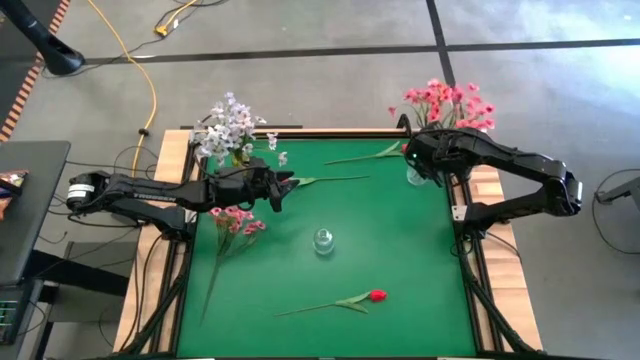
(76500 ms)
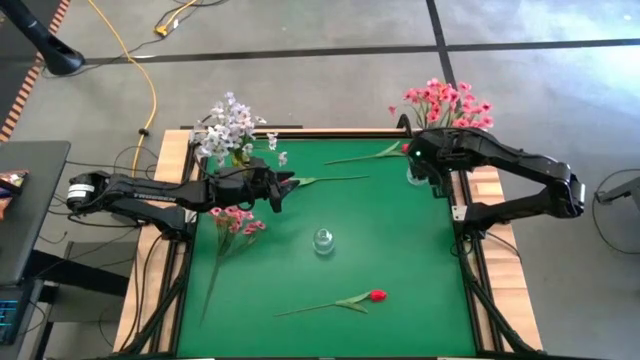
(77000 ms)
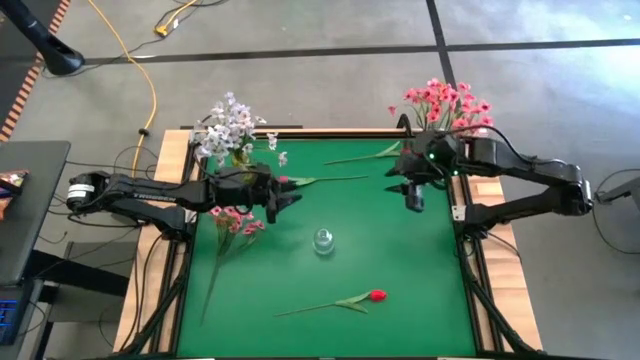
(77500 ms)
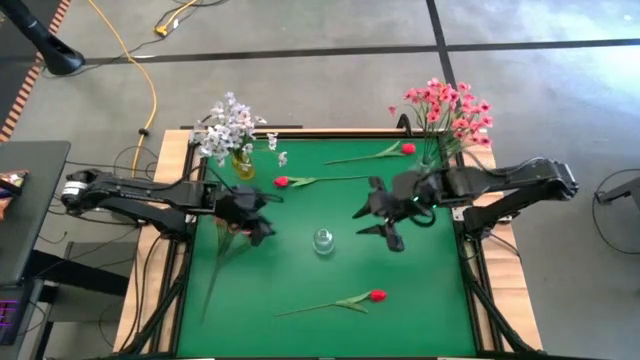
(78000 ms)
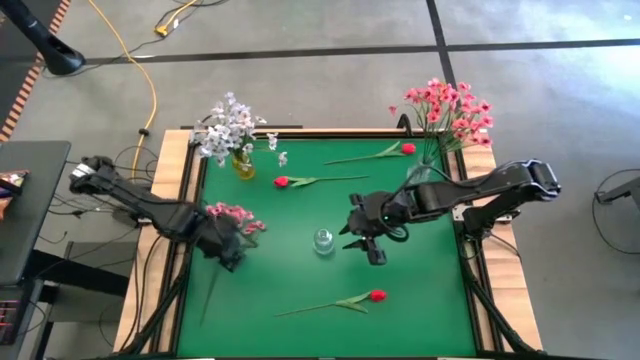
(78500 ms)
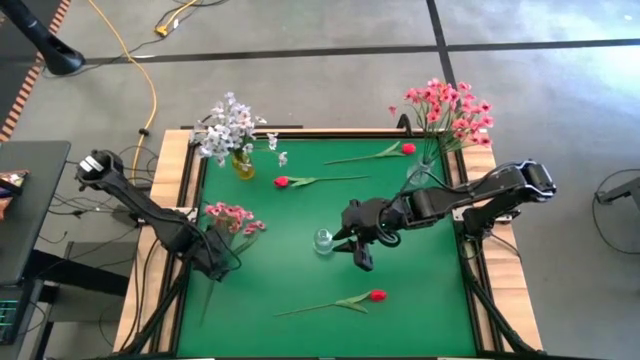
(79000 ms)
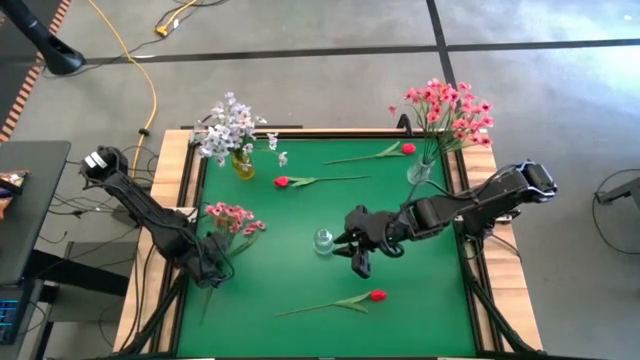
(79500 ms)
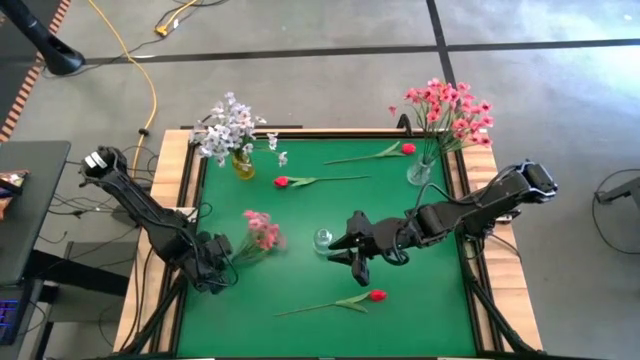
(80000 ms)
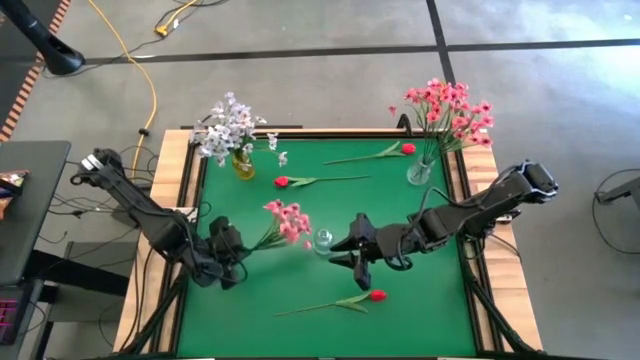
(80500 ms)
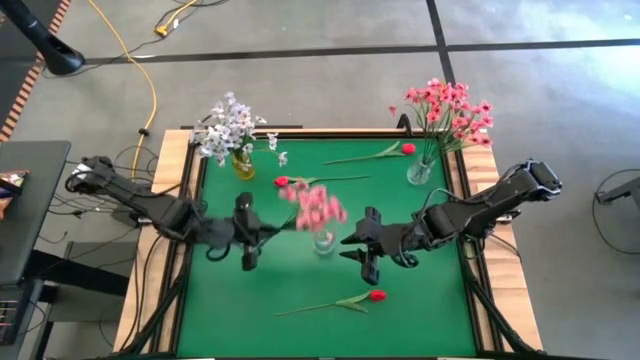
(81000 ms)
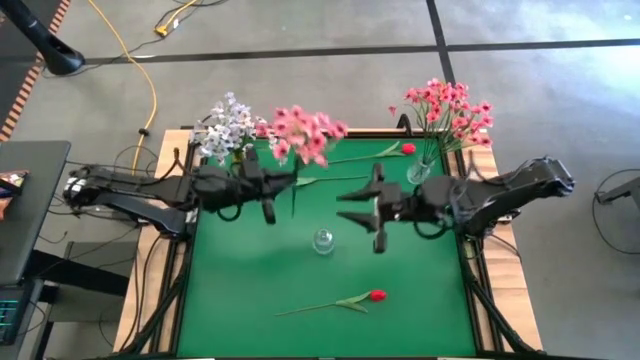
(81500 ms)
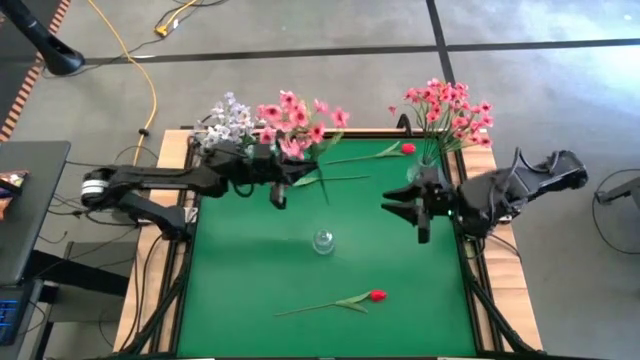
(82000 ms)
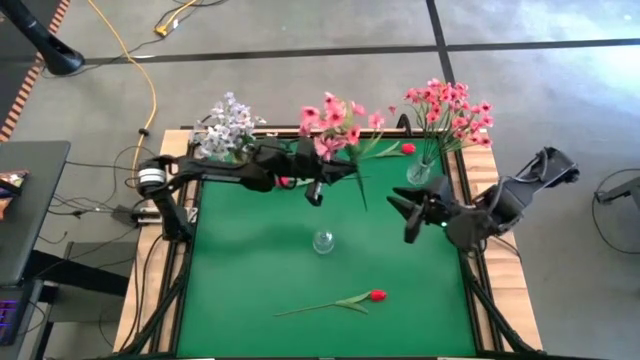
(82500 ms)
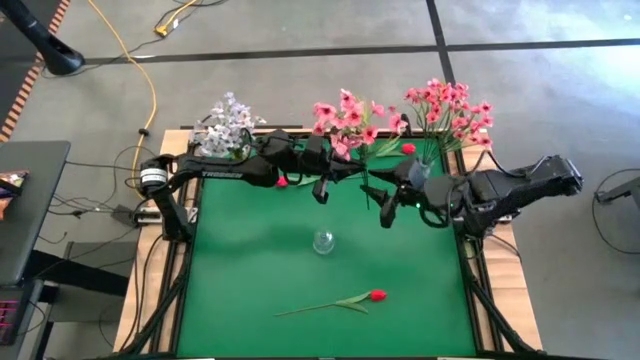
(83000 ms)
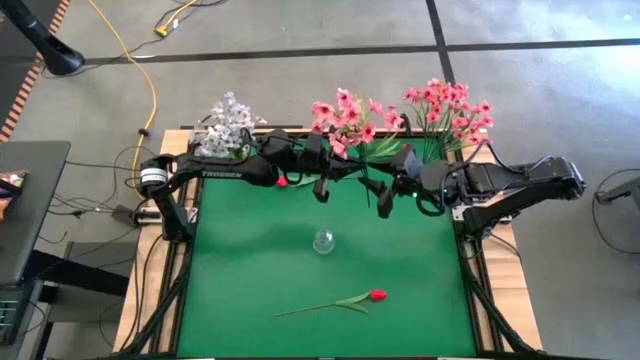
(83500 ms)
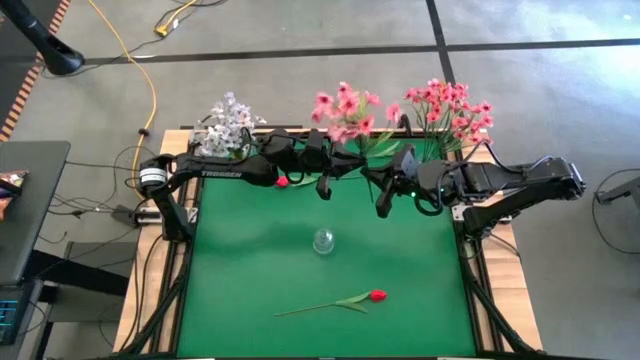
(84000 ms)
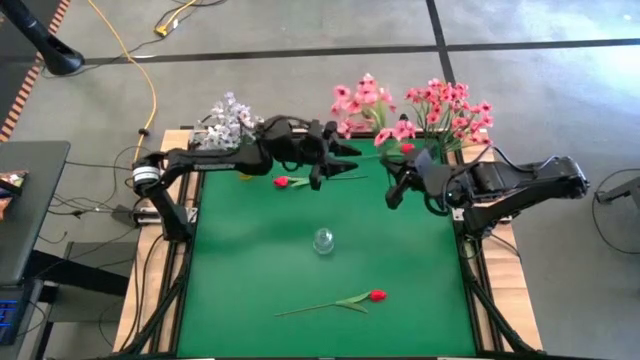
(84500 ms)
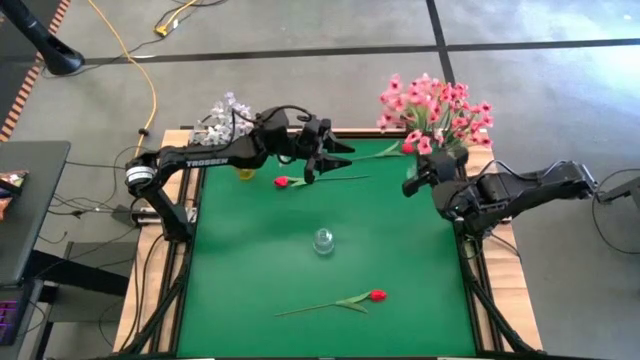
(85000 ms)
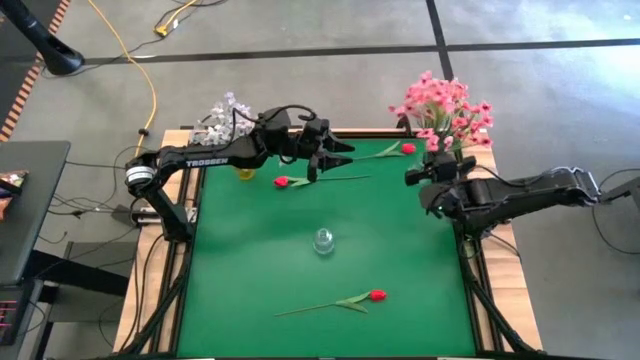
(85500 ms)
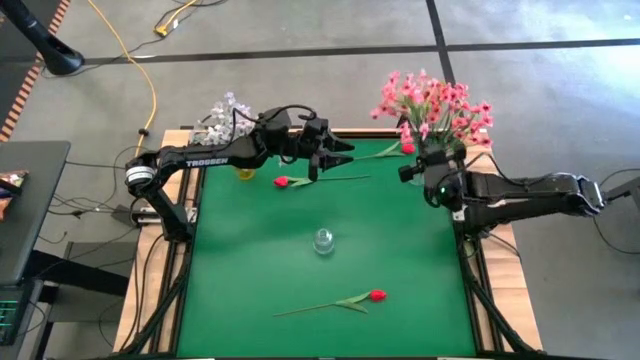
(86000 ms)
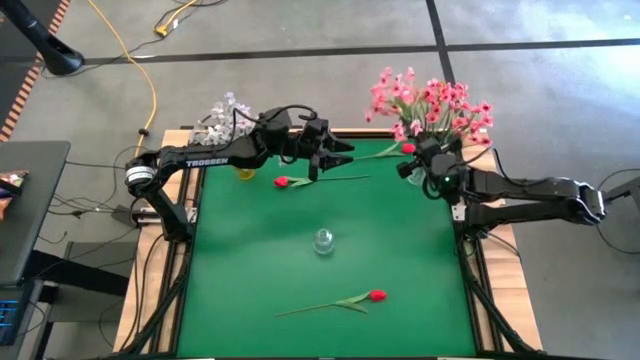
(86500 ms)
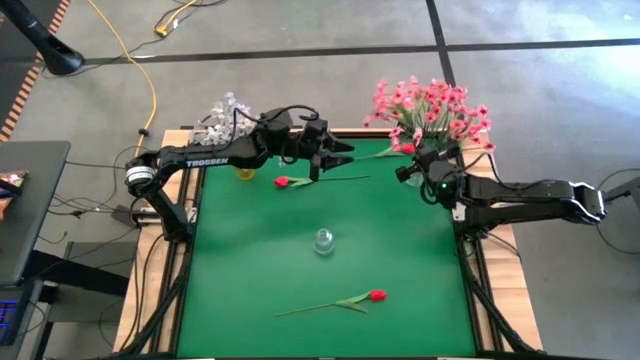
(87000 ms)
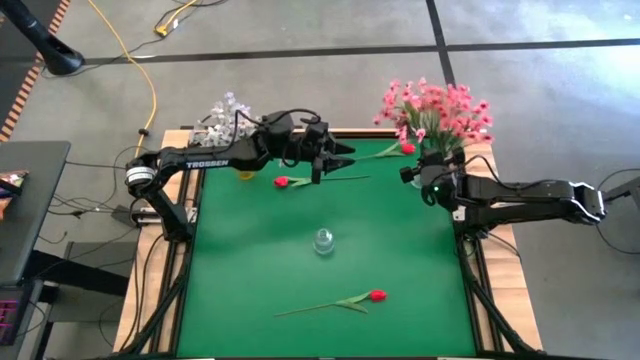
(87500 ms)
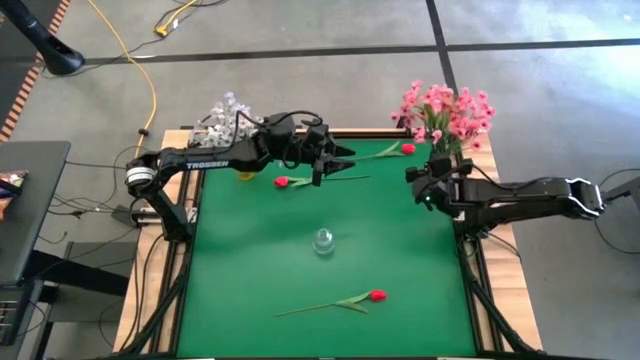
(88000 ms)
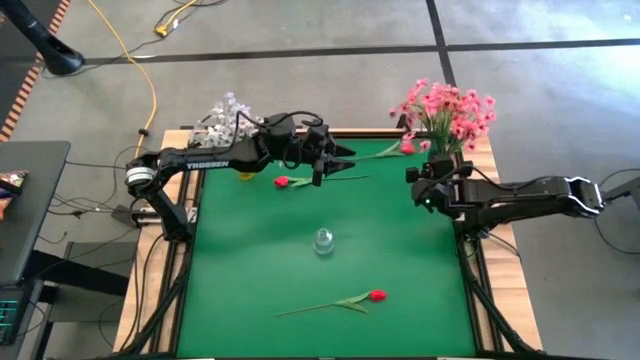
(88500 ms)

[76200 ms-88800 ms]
Task: Sort flowers into vase by color
Put the pink flowers into the top transparent vase

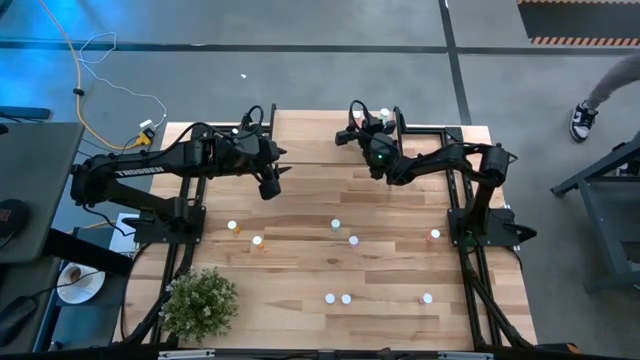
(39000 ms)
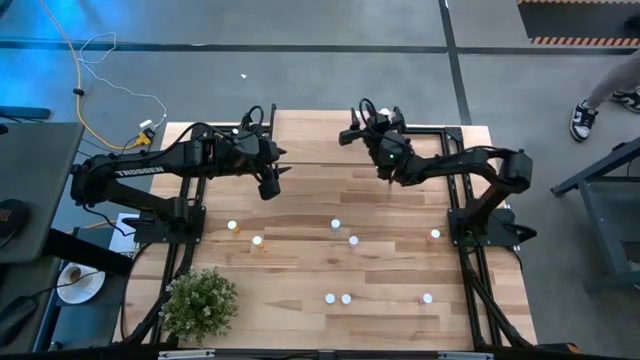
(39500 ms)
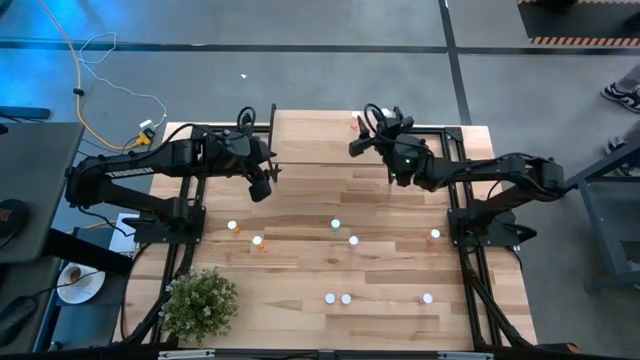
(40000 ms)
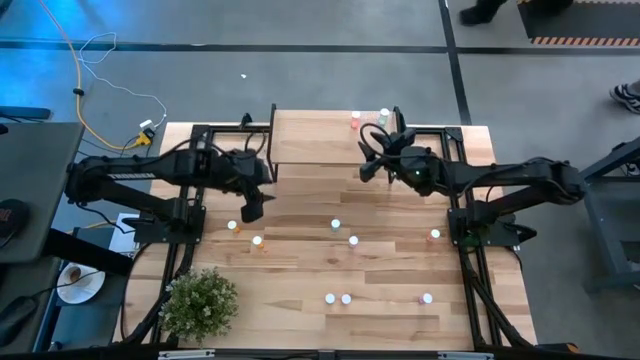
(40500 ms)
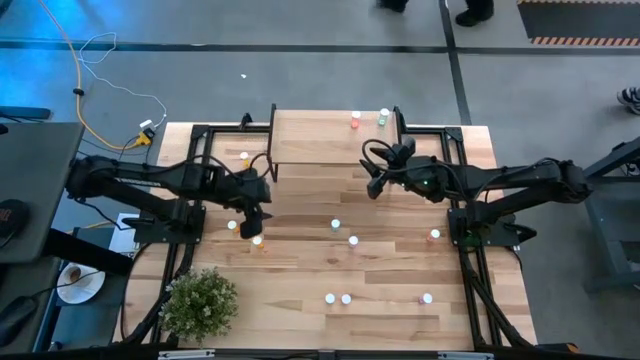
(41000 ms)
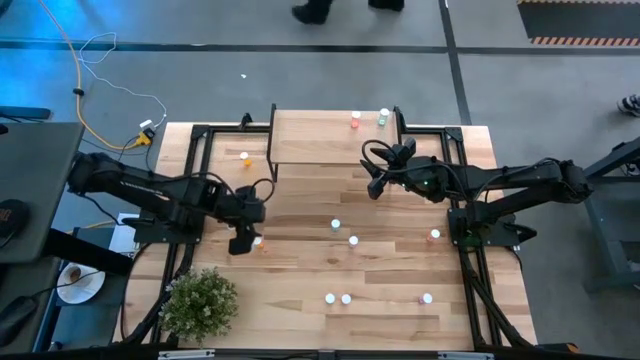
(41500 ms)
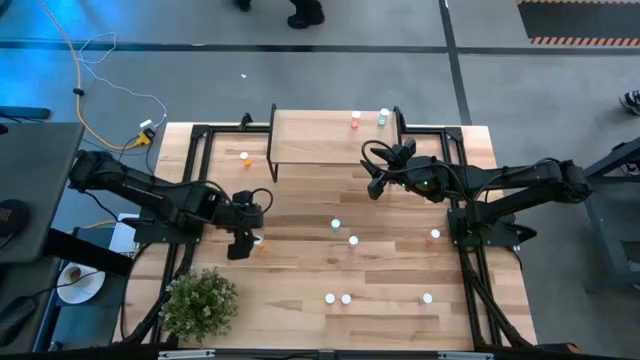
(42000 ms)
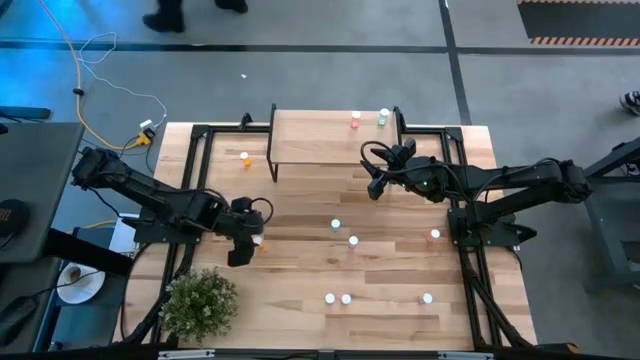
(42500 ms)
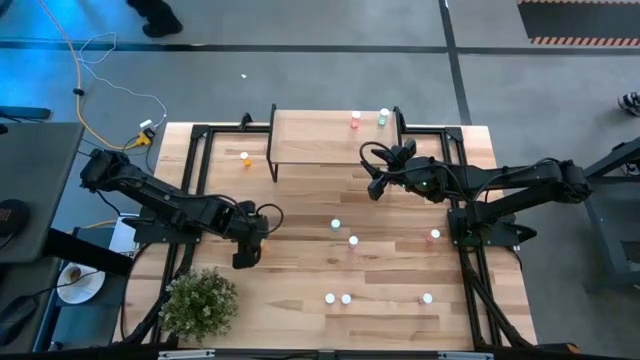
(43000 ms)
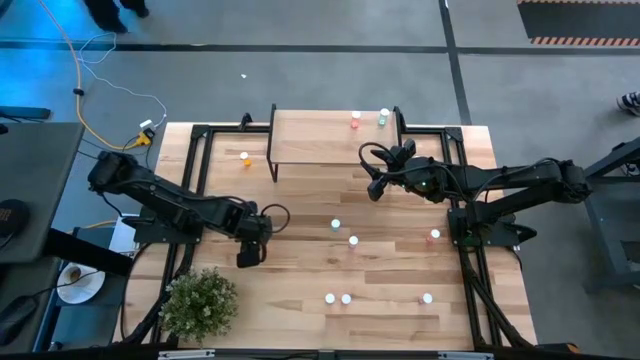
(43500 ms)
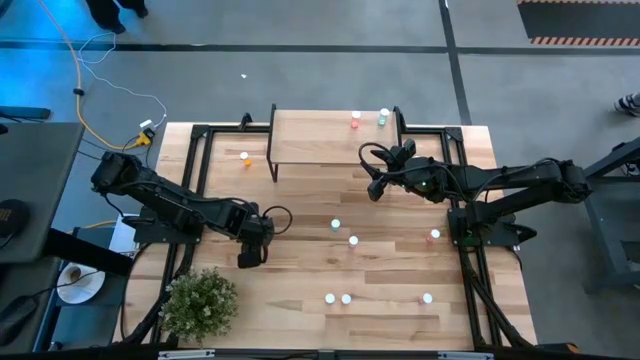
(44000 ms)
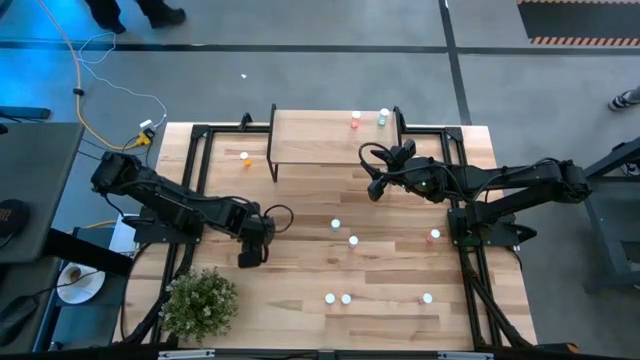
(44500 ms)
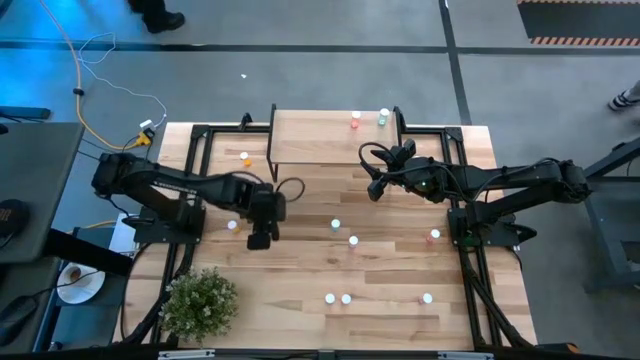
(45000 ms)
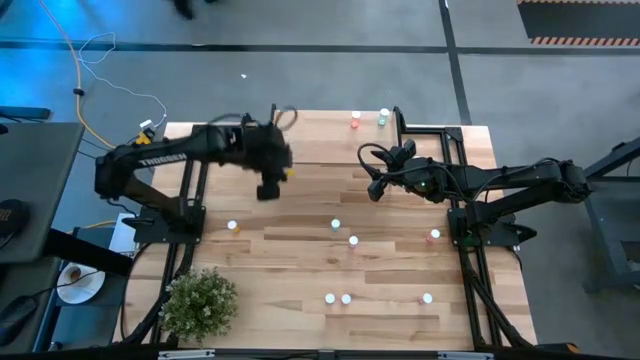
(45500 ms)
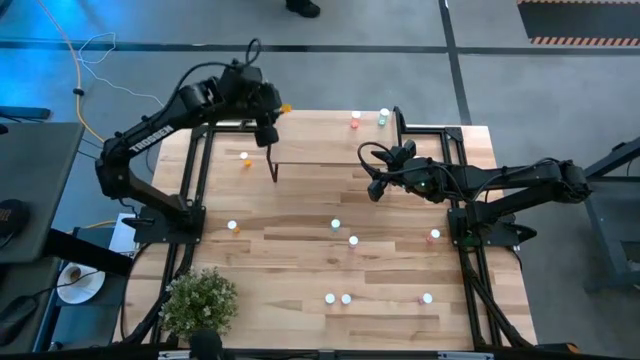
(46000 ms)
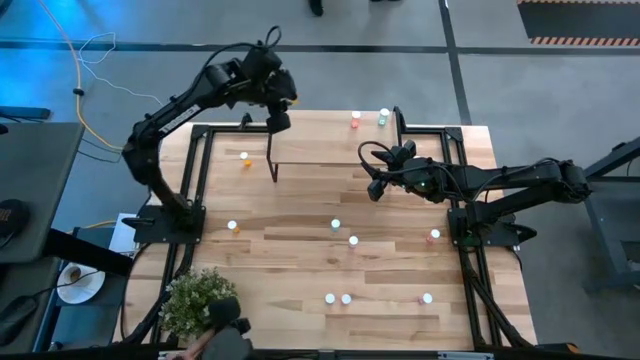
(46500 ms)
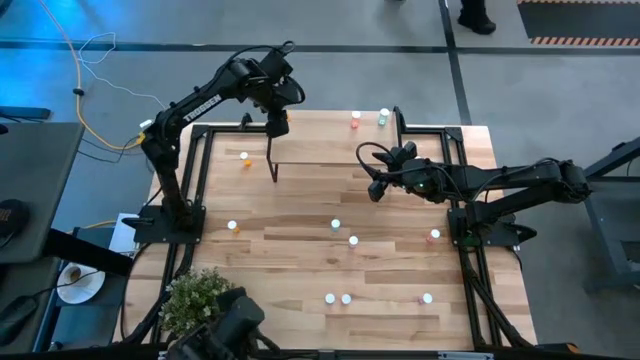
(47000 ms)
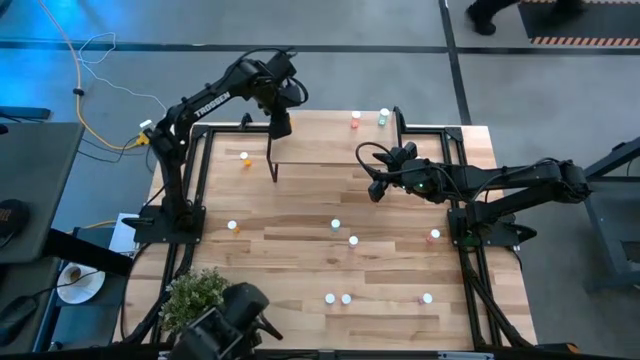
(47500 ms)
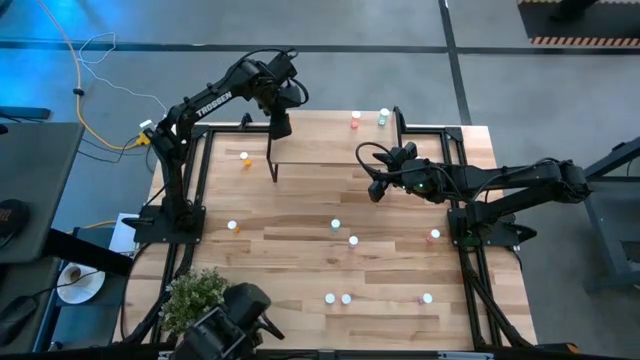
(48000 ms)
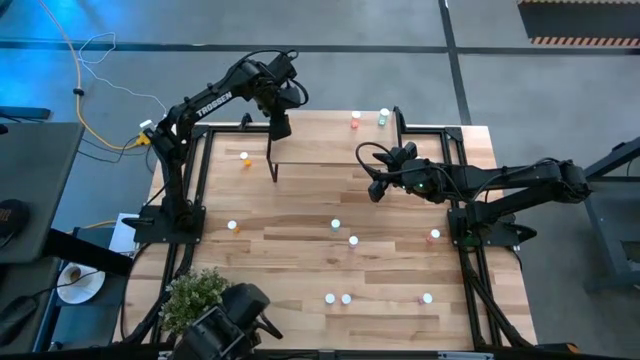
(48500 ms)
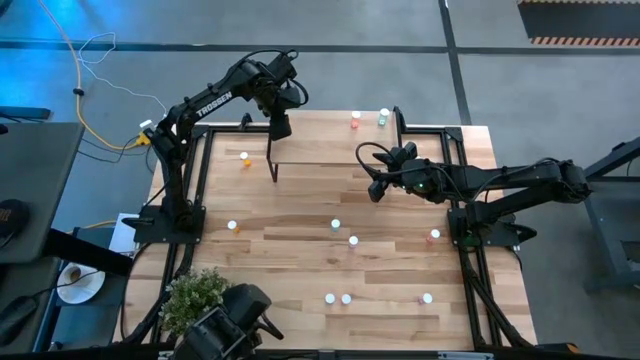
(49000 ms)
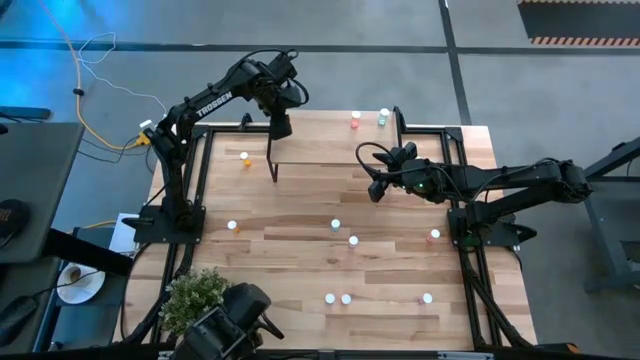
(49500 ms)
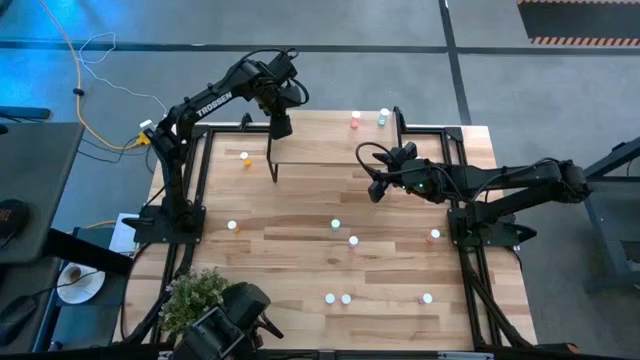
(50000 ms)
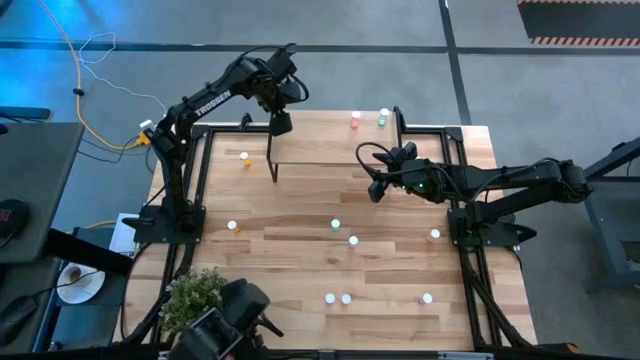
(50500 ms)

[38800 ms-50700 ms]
Task: Pick and place medicine bottles onto shelf by color
Put the bottom orange pill bottle on the shelf
